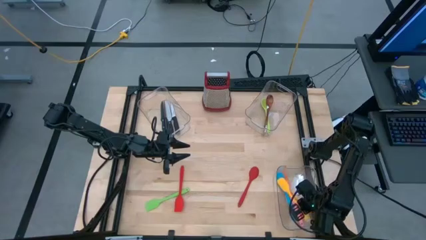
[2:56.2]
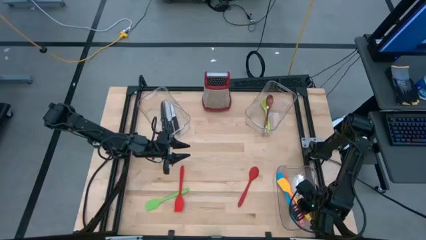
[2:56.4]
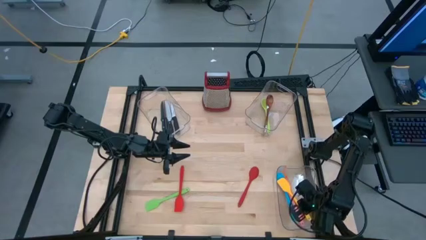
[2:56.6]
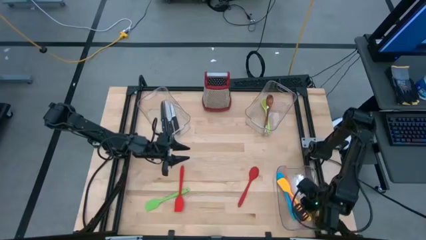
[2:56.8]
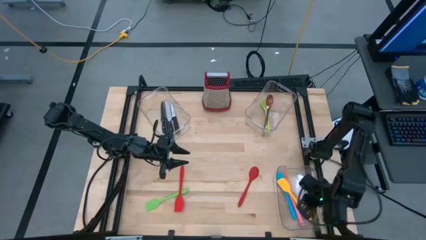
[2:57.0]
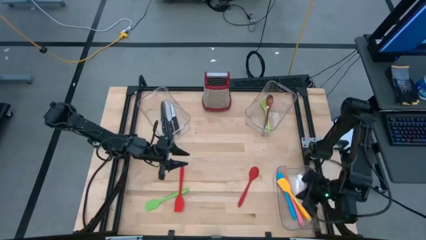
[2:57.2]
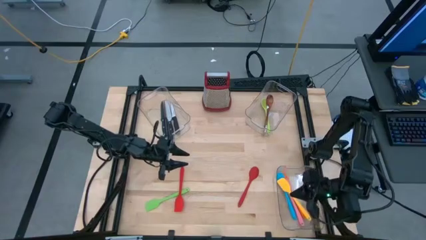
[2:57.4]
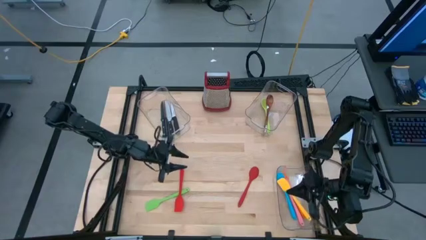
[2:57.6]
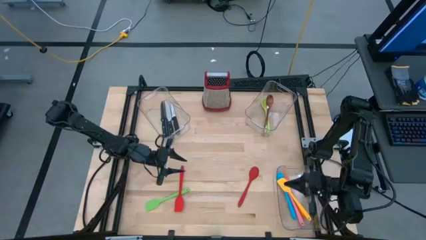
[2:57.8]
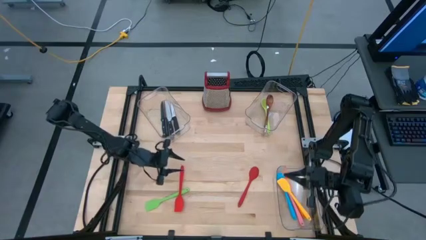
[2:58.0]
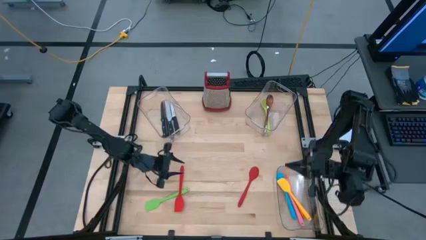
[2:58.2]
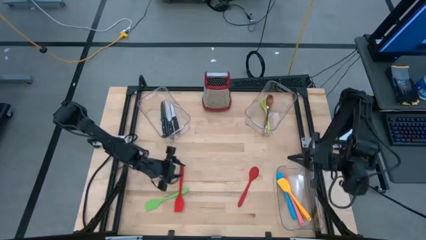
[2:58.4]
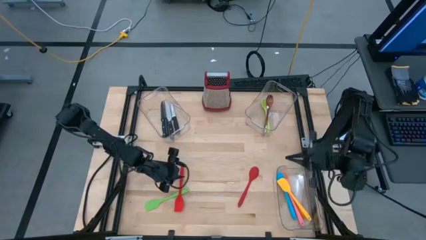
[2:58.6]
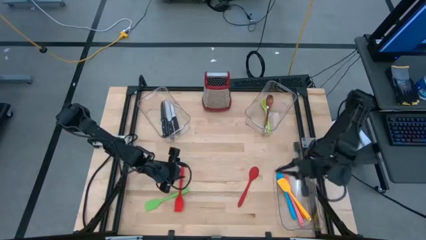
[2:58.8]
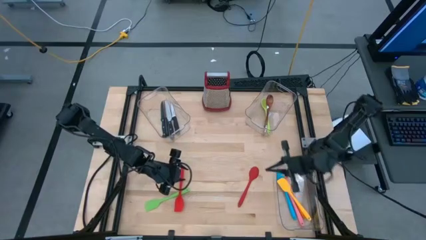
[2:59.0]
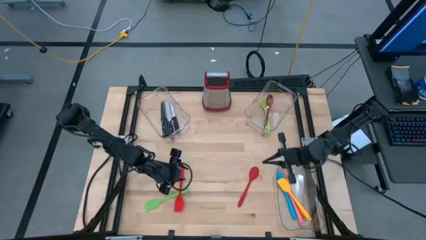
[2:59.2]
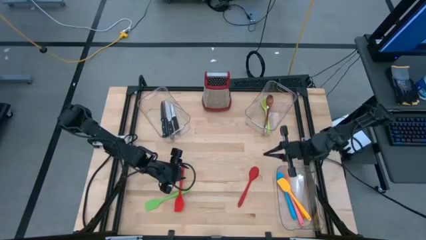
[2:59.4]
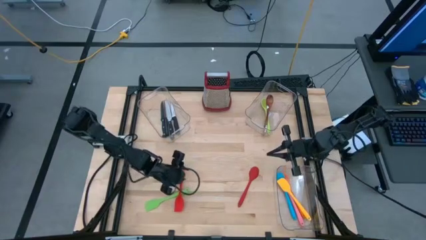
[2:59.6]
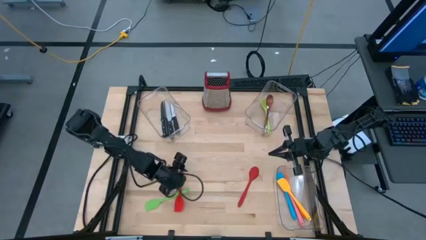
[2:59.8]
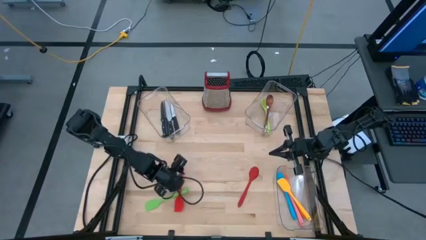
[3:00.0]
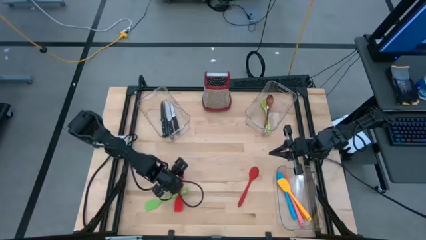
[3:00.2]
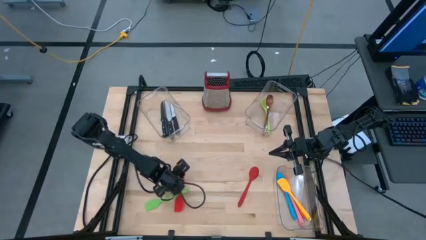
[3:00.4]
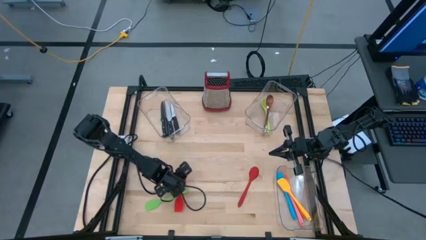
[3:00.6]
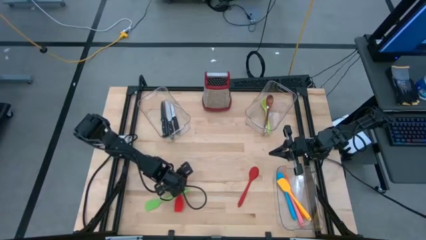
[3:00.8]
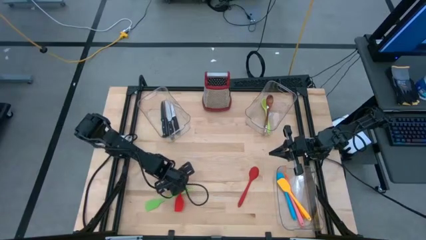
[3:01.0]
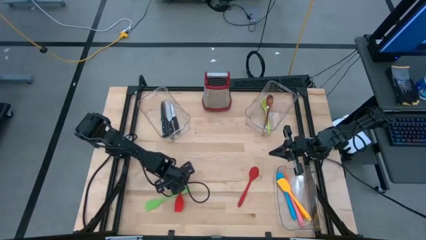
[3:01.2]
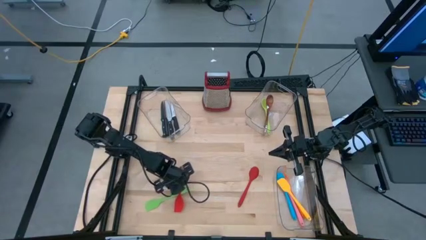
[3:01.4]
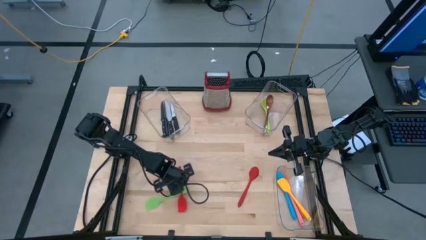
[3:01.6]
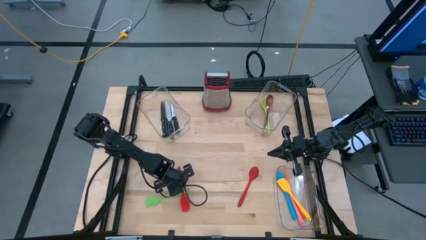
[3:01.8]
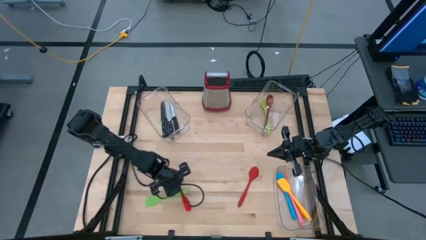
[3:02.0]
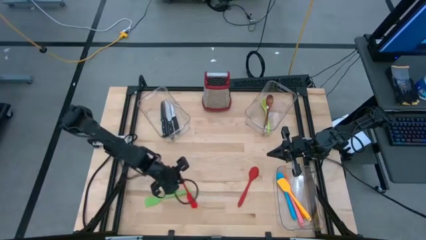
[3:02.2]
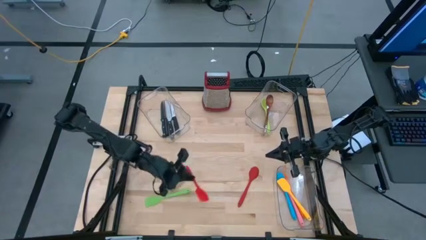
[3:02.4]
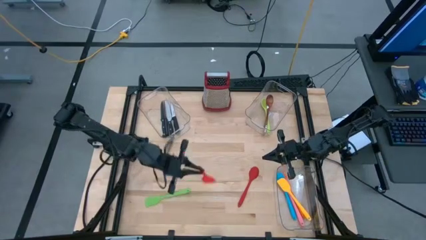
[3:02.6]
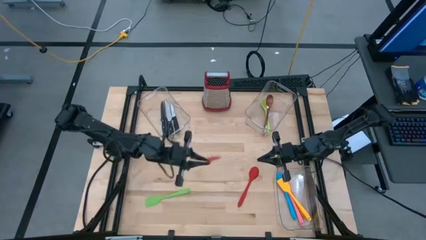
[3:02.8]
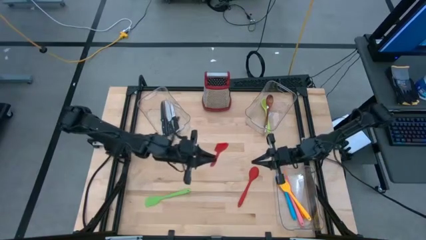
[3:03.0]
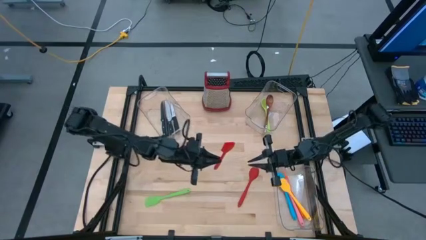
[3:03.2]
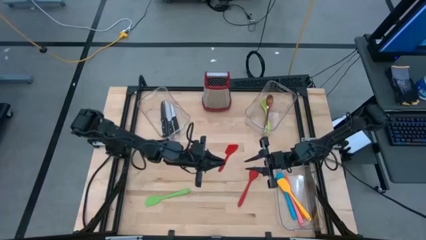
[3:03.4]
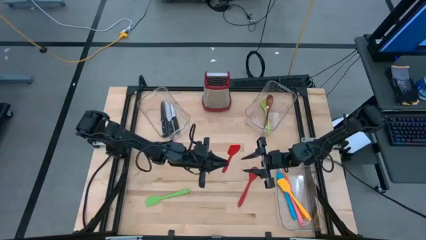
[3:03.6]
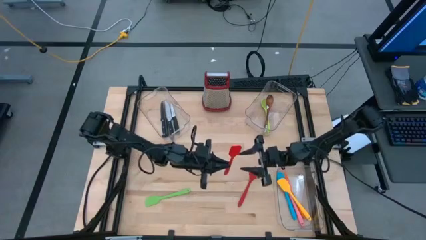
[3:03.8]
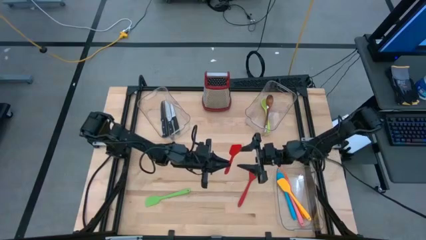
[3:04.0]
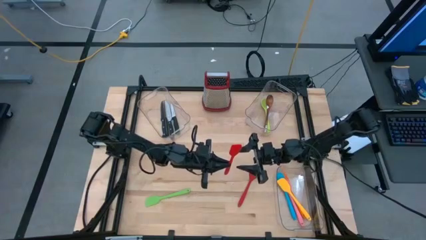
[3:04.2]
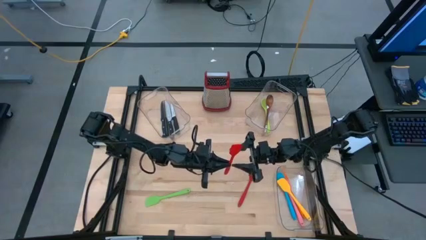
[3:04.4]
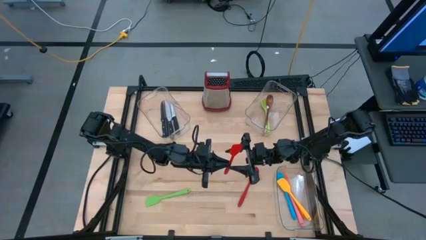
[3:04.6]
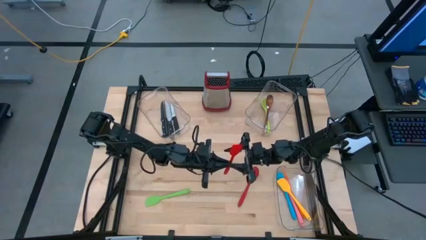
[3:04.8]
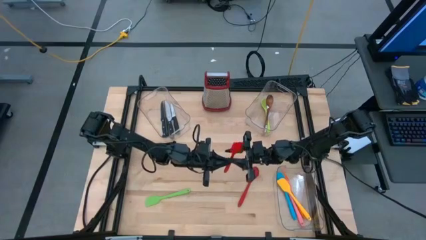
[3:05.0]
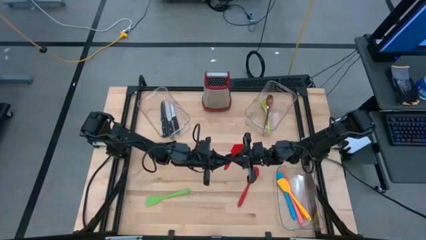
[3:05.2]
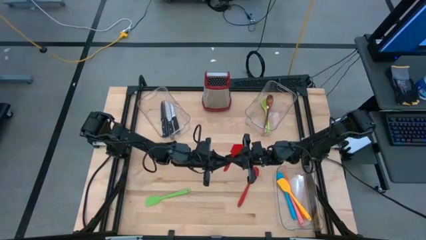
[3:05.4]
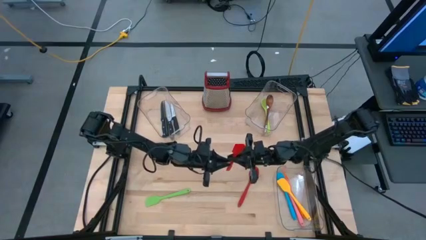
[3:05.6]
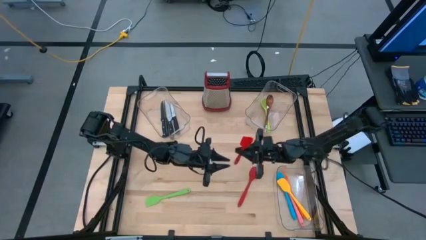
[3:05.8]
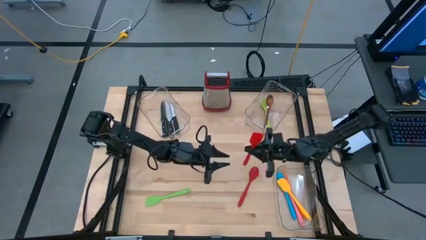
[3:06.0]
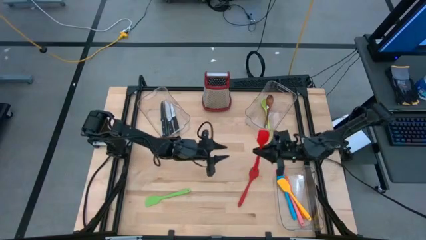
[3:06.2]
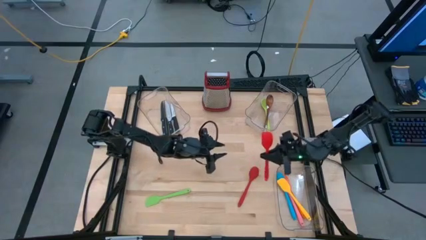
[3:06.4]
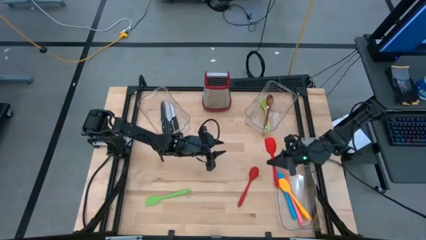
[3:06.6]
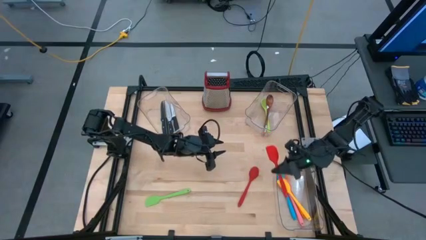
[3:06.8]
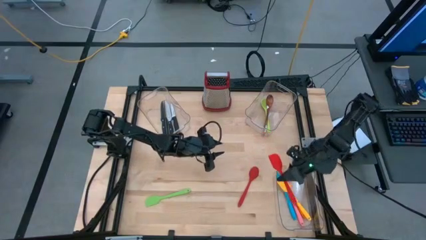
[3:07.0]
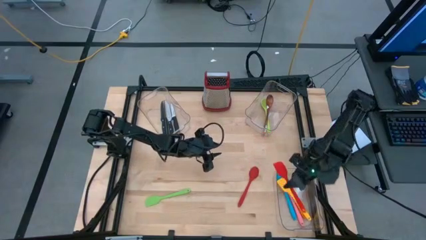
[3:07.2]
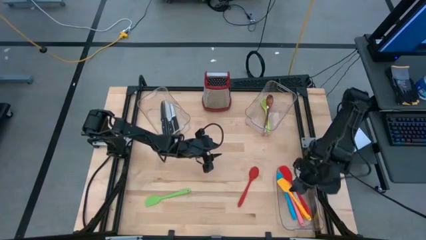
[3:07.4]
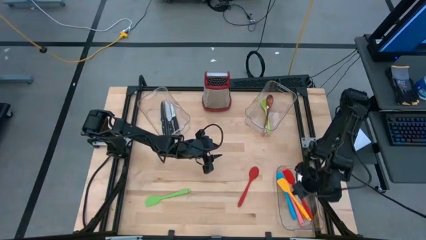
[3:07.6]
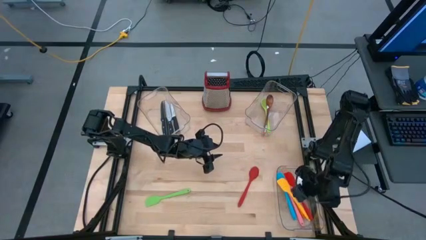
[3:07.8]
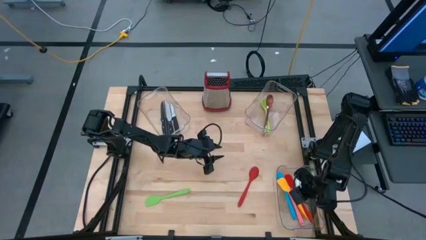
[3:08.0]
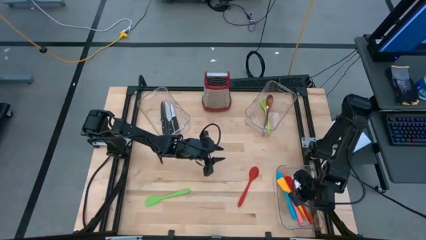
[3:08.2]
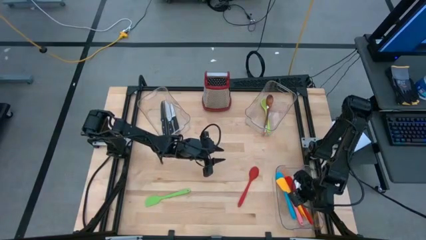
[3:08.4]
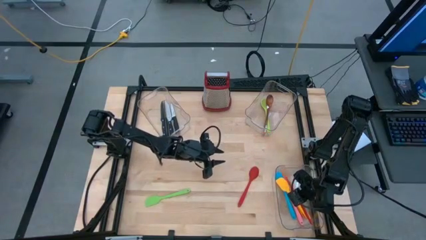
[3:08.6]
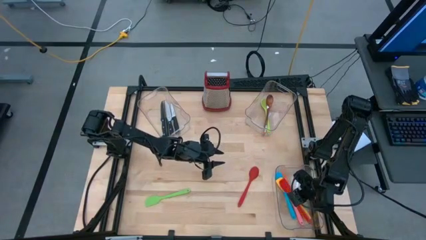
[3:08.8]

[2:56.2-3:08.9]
Task: Pick & Place Kitchen Items
Put the red spatula into the bottom right transparent bin
